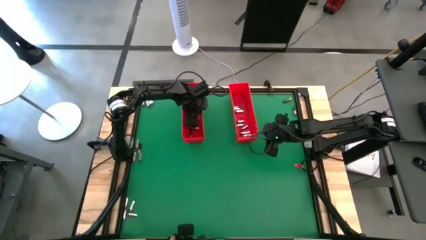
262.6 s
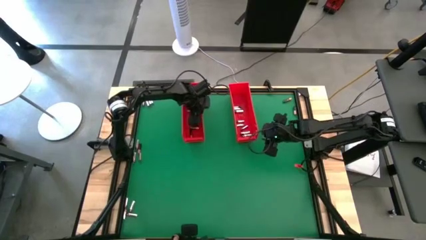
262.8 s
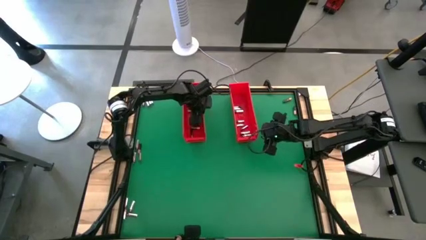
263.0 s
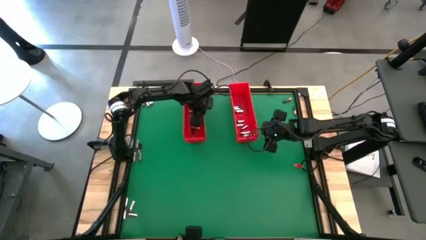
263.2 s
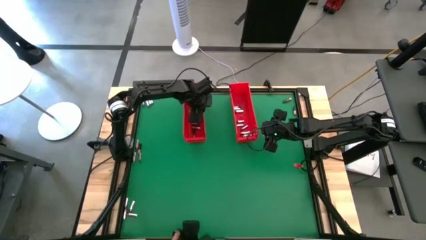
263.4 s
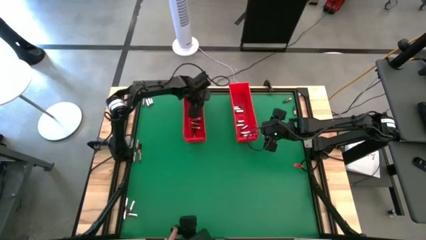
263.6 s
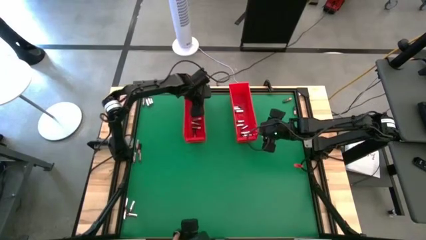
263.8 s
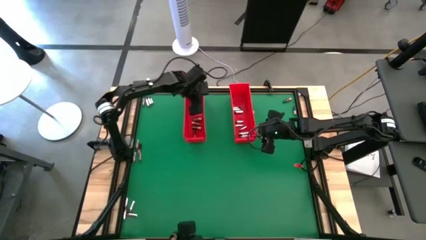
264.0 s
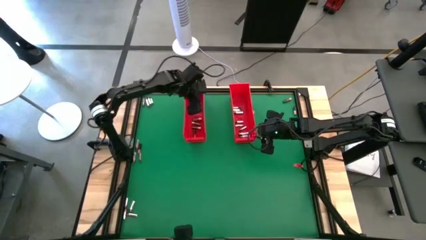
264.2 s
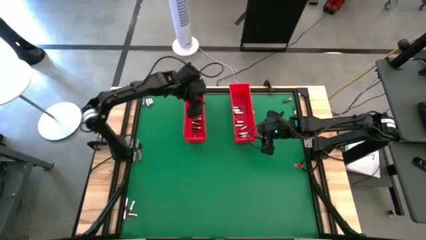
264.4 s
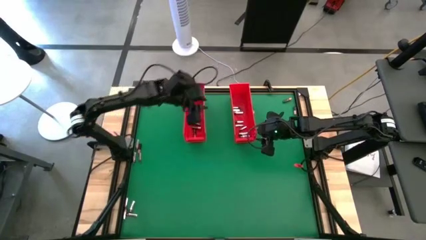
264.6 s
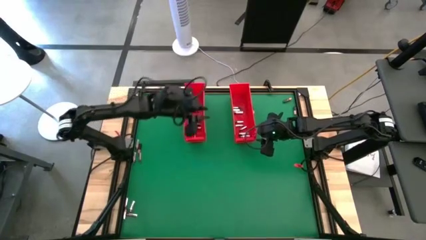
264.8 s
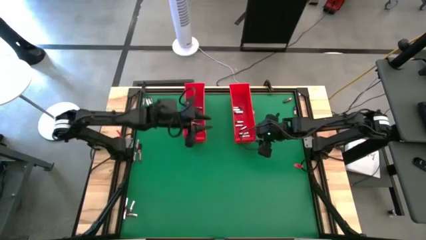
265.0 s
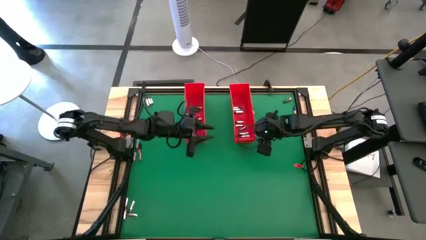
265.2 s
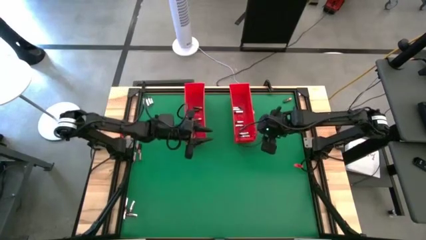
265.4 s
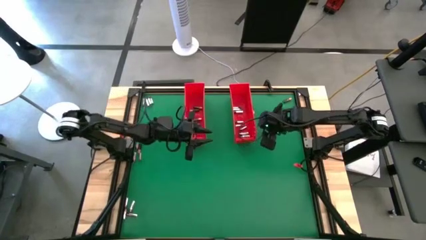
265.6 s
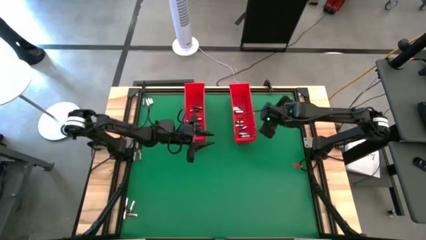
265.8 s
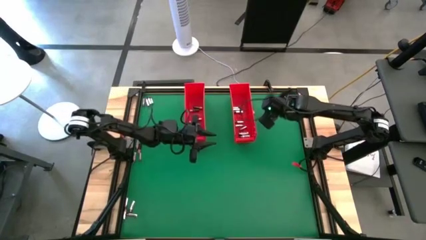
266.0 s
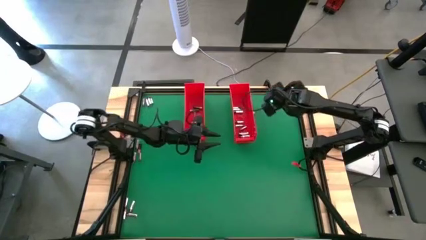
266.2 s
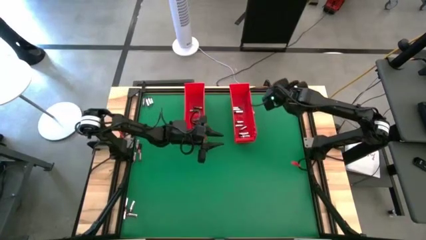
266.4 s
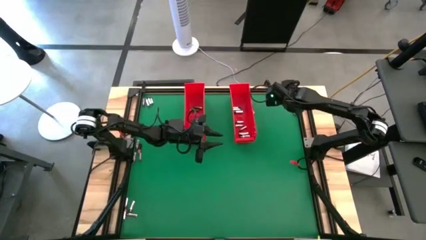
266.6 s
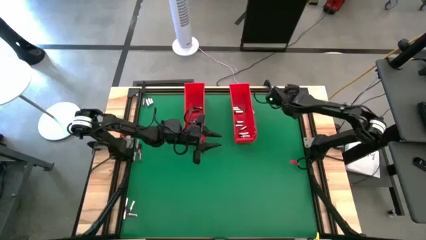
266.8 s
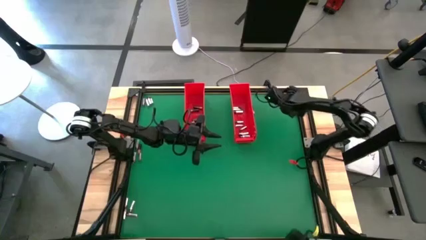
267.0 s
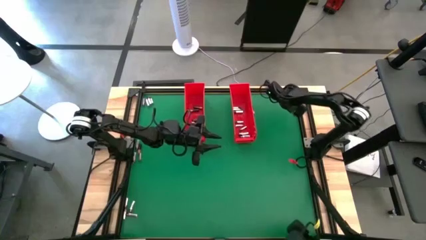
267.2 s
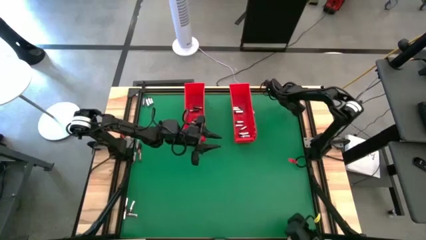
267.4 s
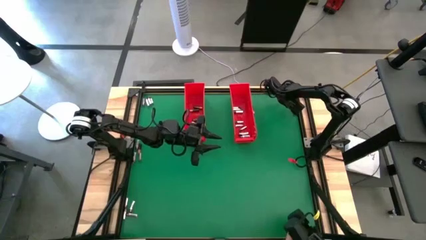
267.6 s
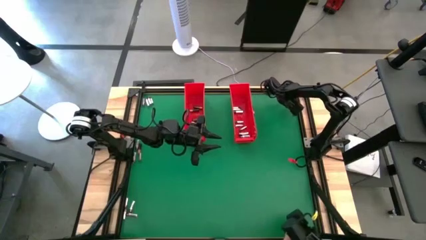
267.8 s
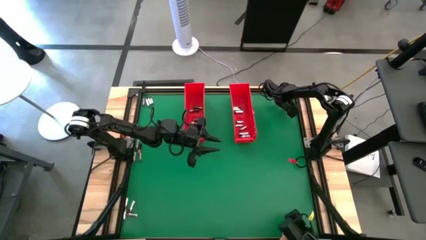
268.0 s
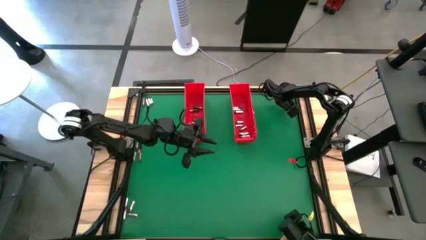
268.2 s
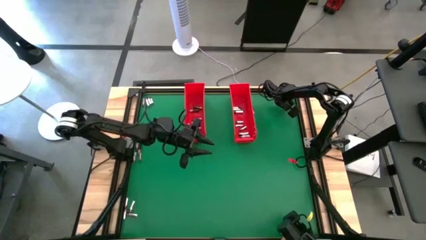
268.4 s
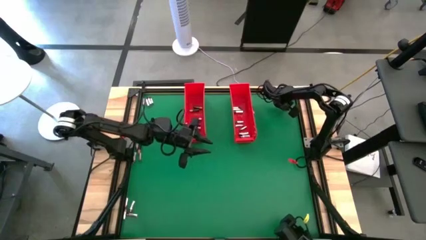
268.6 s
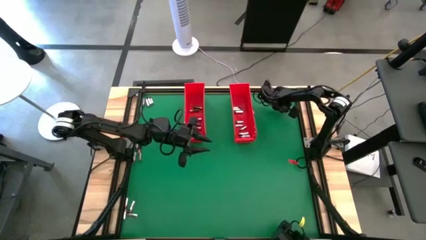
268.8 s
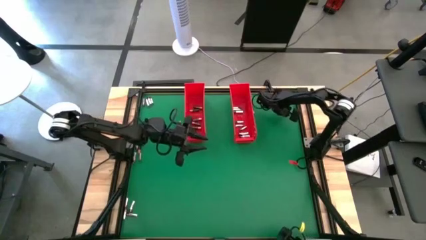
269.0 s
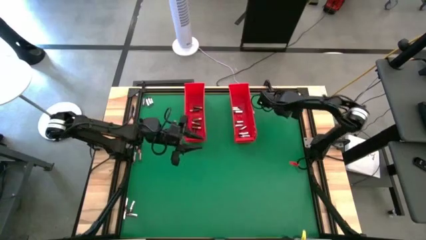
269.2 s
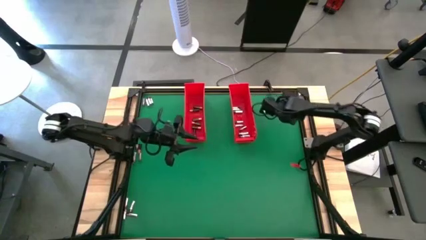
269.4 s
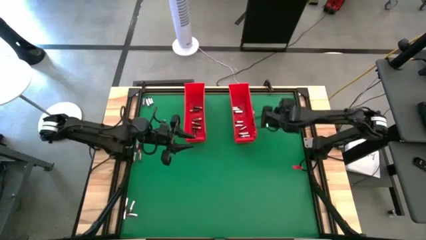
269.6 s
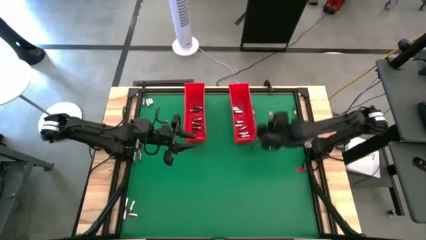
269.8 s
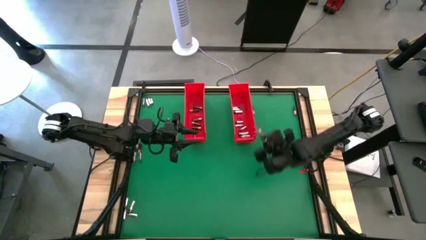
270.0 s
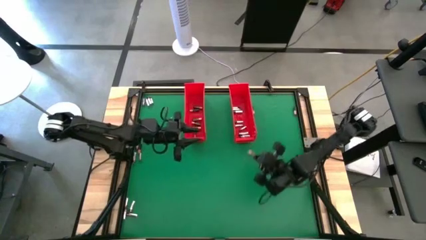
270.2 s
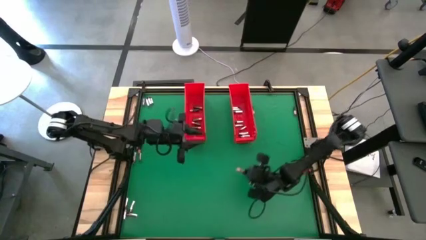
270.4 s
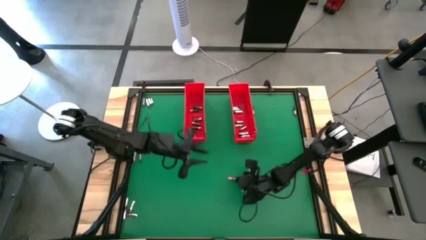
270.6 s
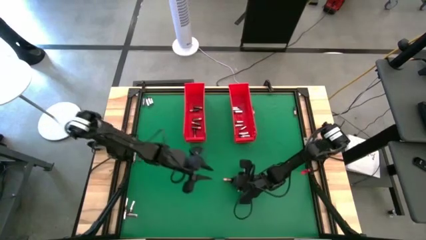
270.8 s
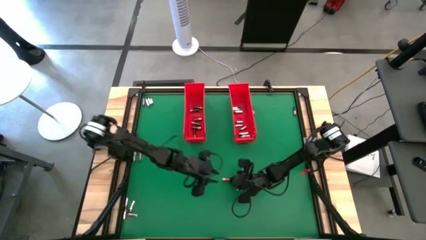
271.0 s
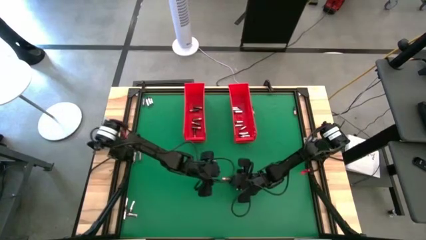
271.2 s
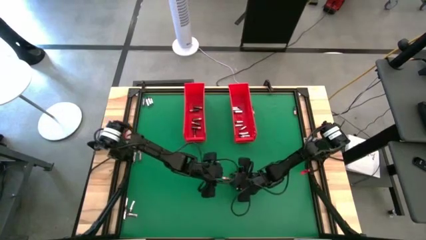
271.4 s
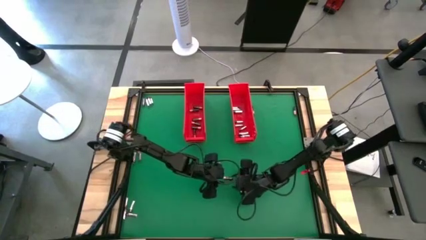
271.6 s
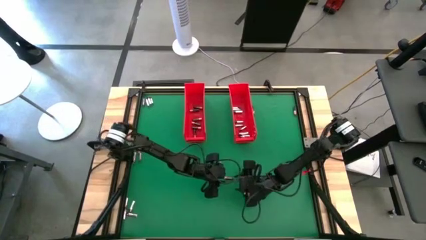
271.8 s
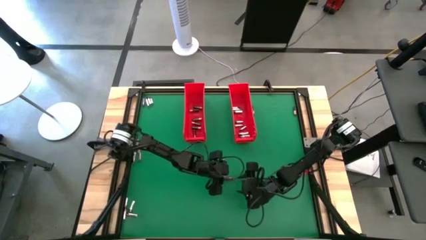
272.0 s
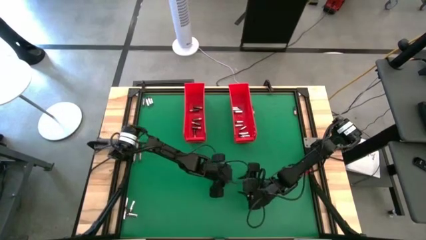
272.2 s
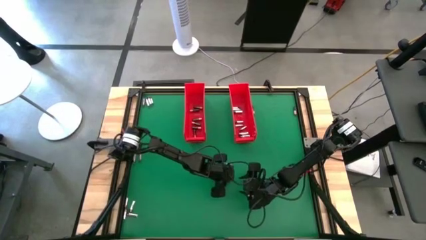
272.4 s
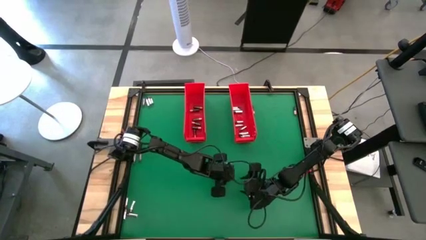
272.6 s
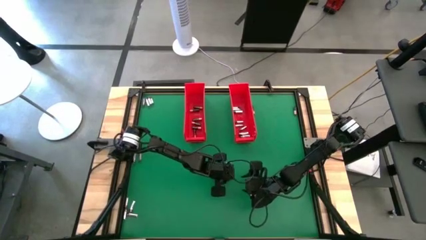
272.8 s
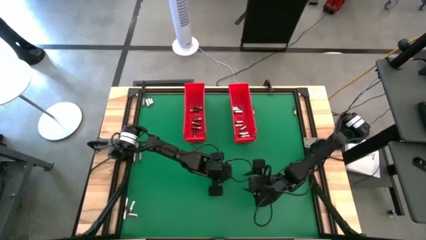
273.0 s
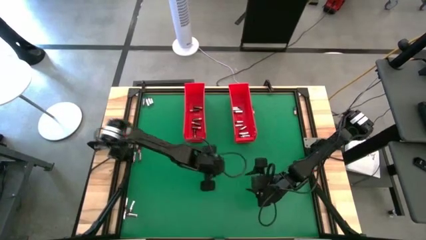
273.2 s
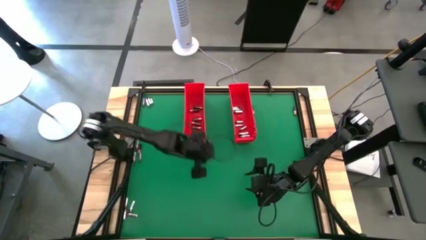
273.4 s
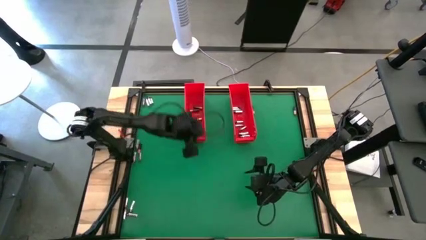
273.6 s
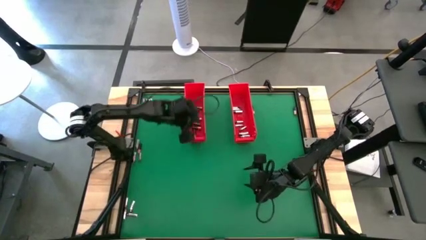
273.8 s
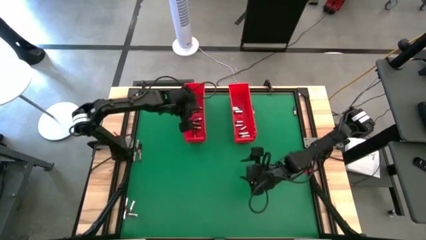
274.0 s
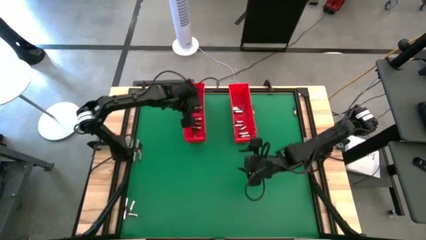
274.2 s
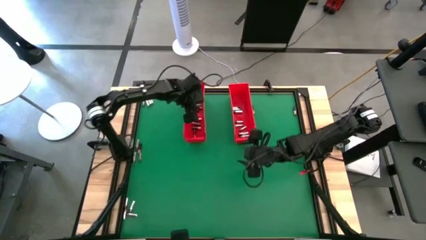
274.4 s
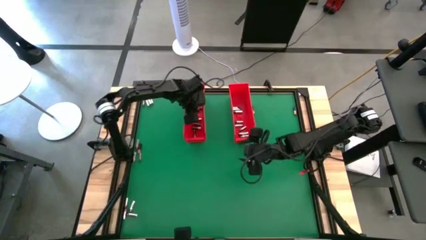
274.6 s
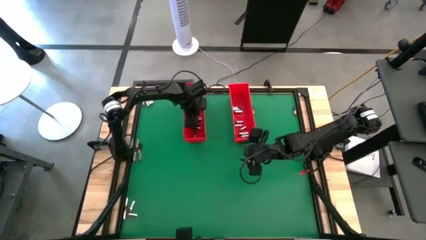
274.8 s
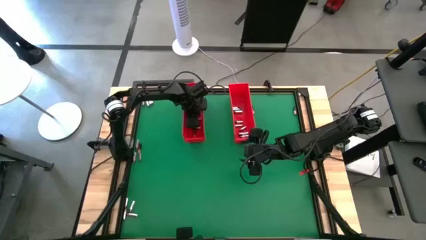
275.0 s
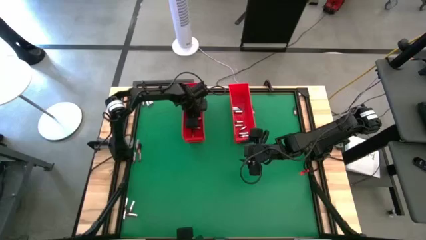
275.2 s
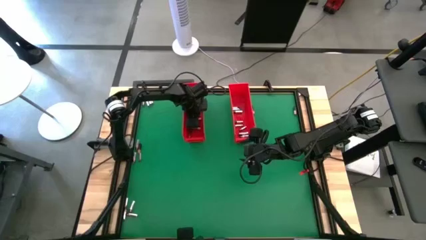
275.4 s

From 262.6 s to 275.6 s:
Task: Sort batteries
Put the brown battery into the left red bin

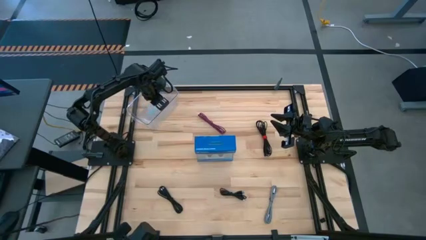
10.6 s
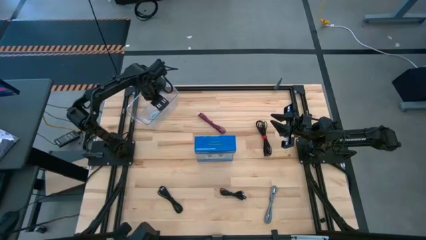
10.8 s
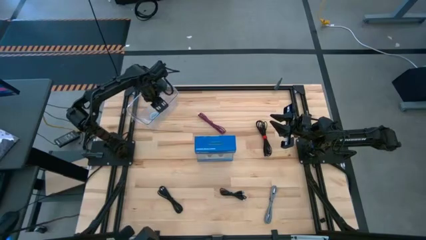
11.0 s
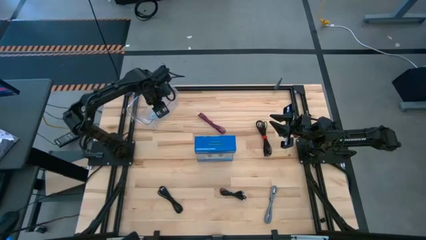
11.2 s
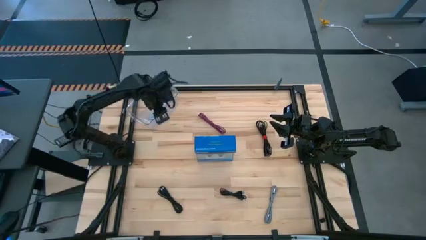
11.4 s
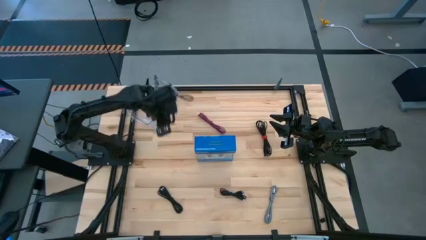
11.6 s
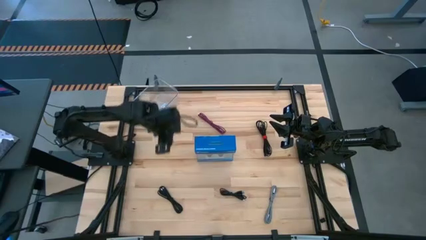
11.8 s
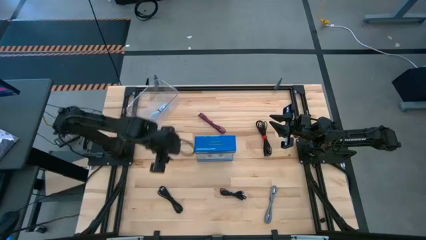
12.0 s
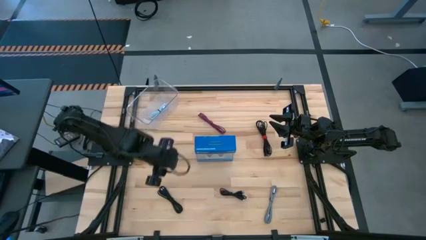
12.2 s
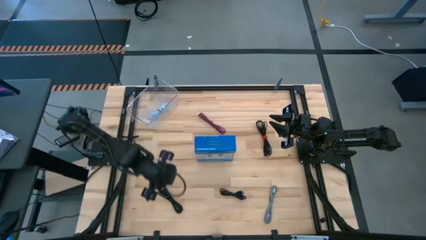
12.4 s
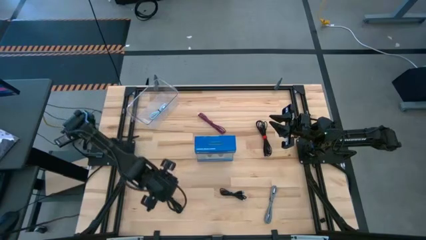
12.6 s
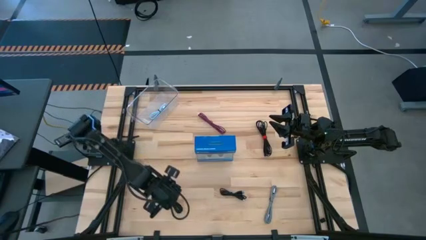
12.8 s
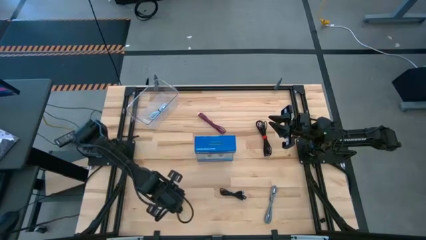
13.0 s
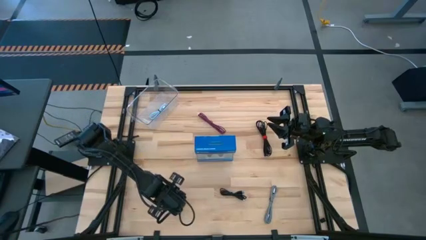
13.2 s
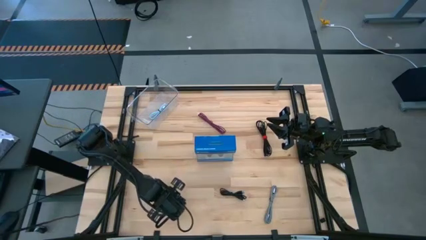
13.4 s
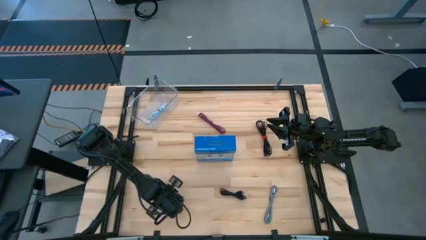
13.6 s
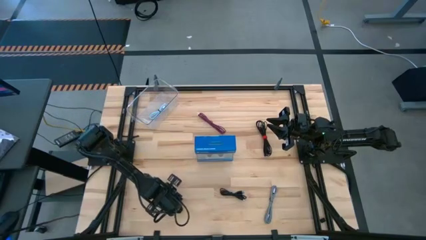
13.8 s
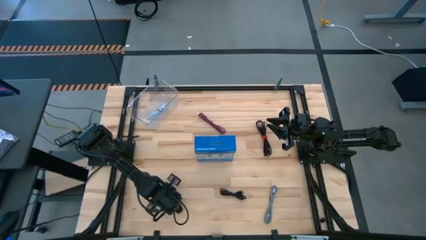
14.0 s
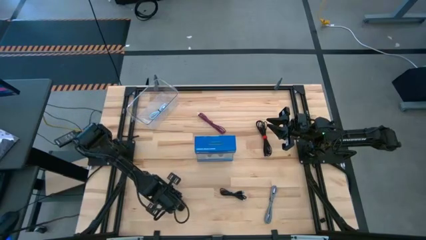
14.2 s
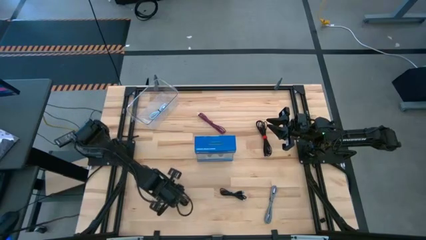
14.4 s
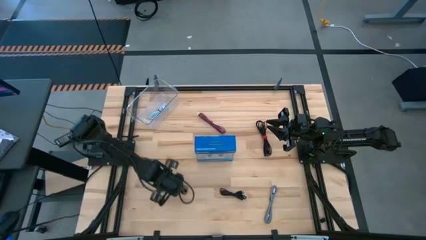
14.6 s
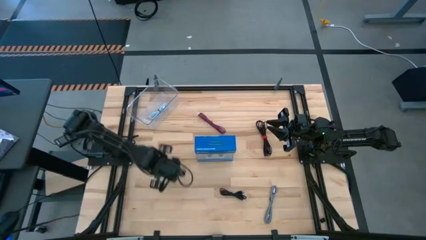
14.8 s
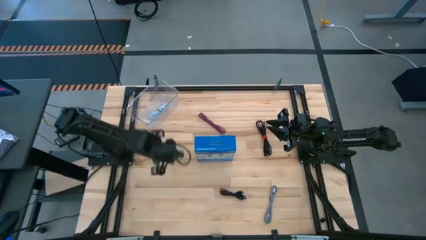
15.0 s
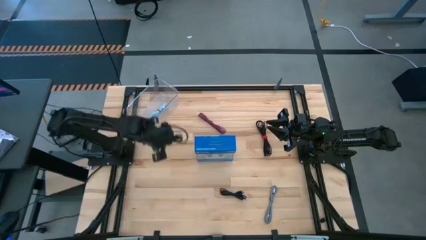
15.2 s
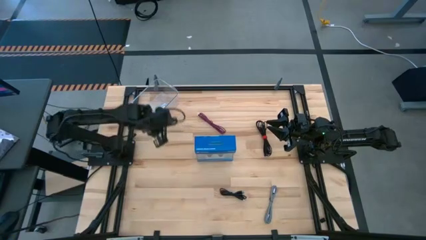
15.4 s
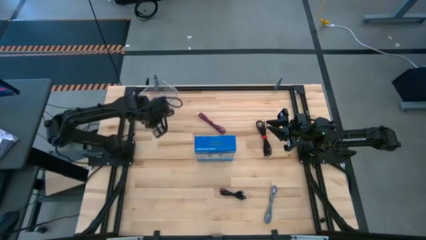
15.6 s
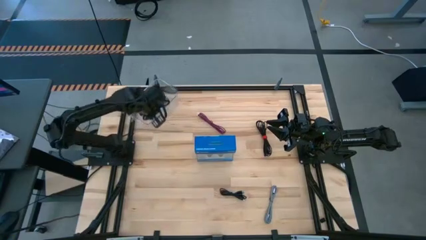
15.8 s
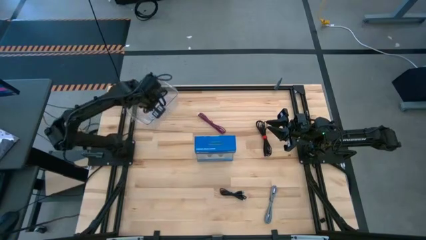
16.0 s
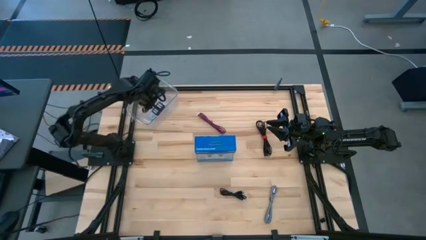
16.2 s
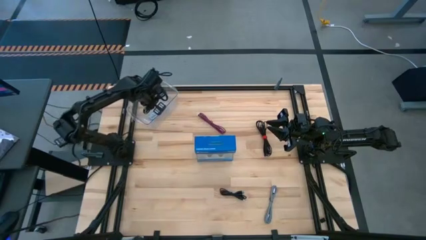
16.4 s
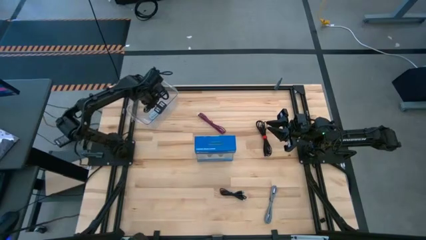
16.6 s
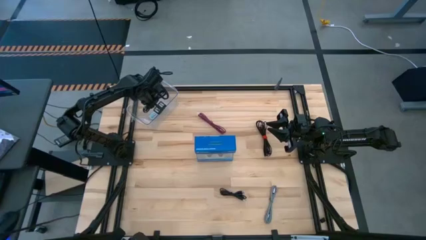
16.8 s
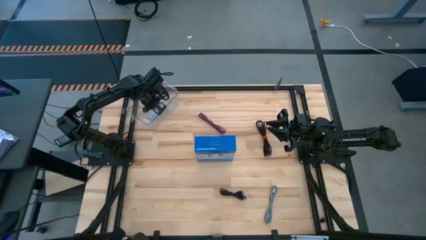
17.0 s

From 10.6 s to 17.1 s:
Task: Pick and place USB-C Cables
Put the bottom left black charger cable into the transparent bin
